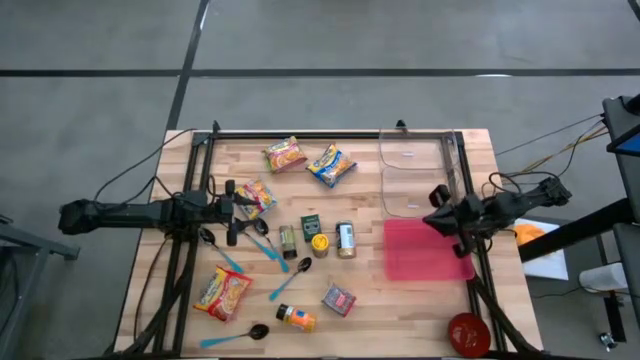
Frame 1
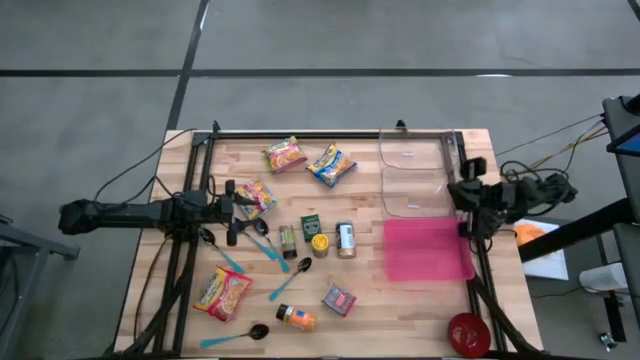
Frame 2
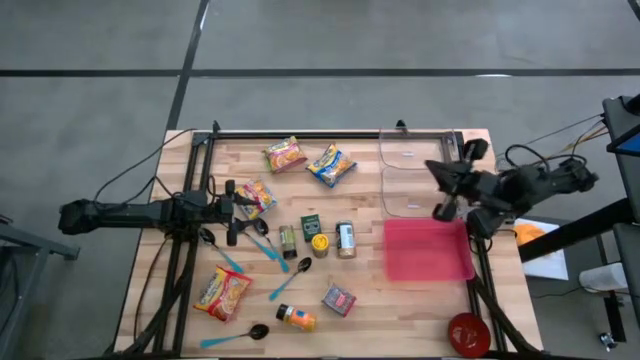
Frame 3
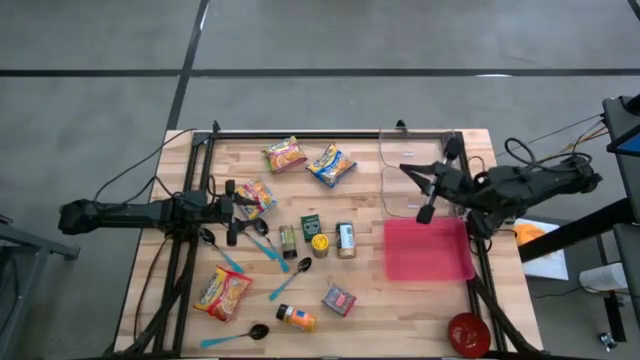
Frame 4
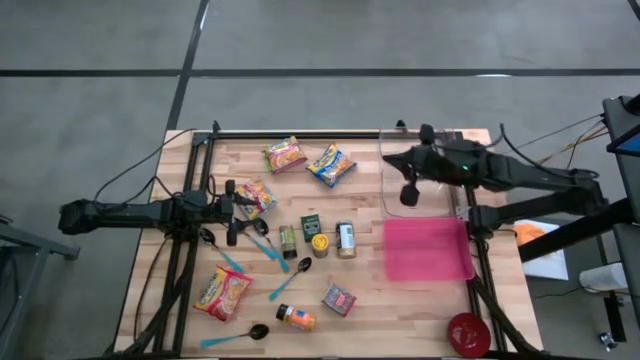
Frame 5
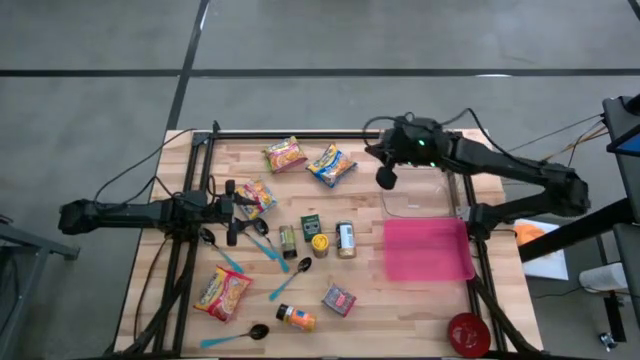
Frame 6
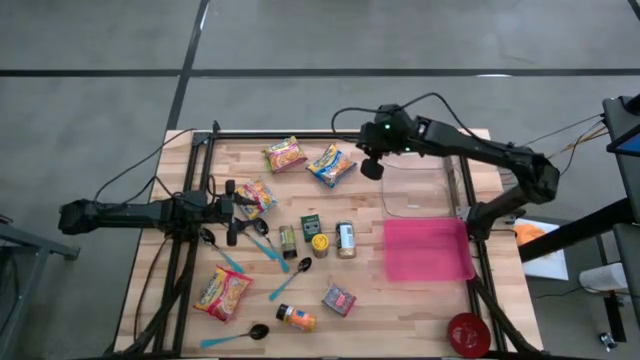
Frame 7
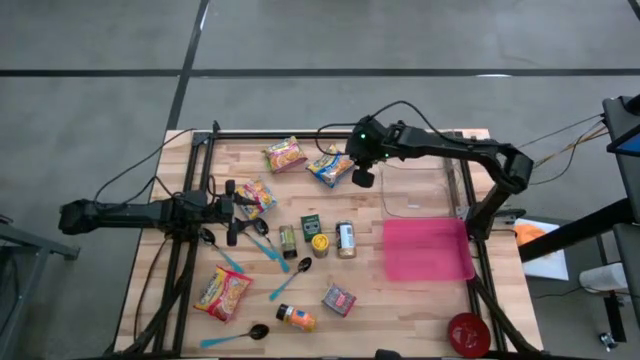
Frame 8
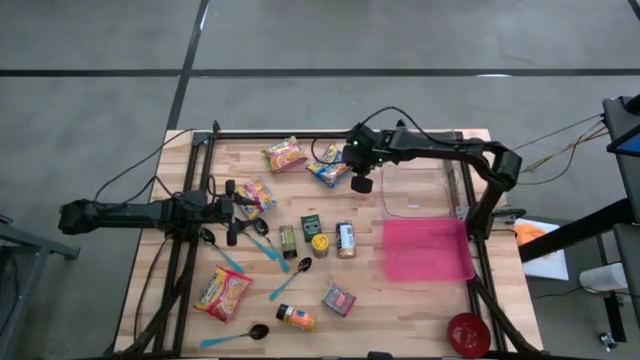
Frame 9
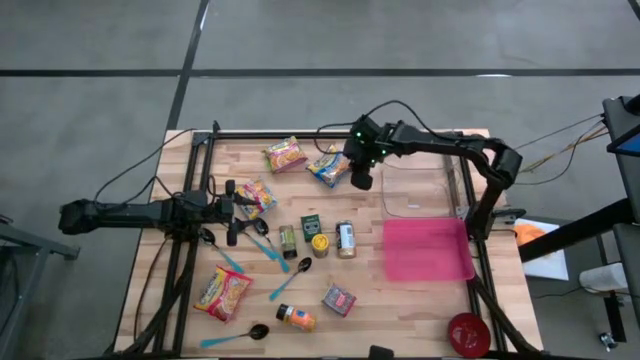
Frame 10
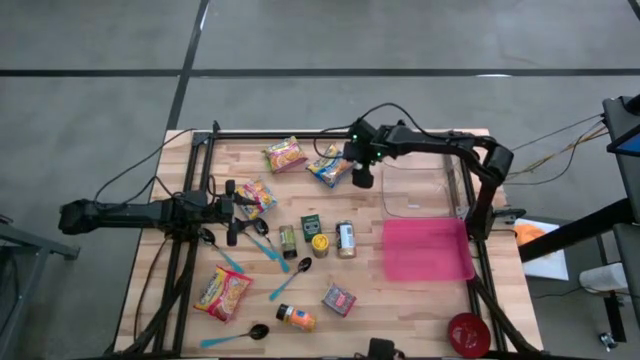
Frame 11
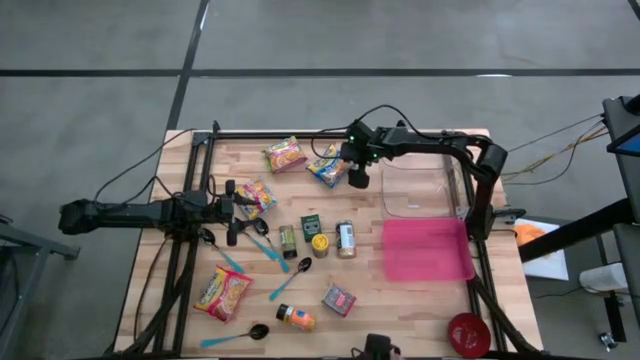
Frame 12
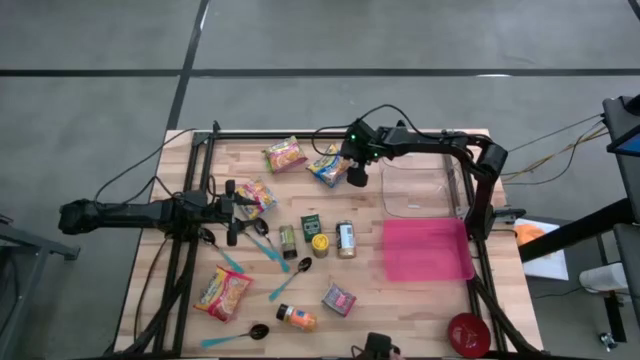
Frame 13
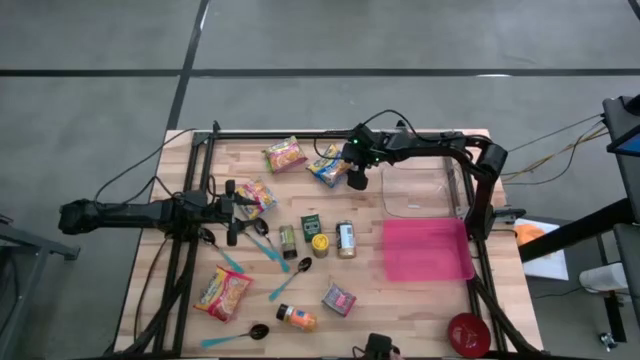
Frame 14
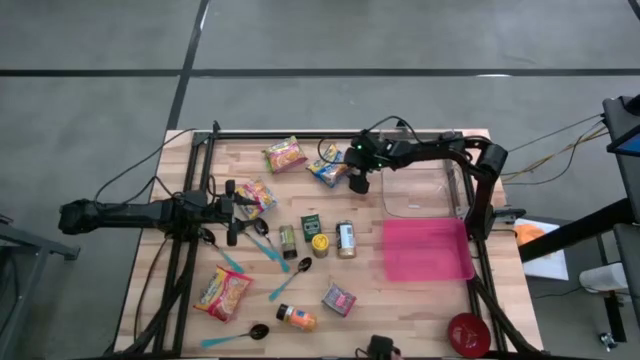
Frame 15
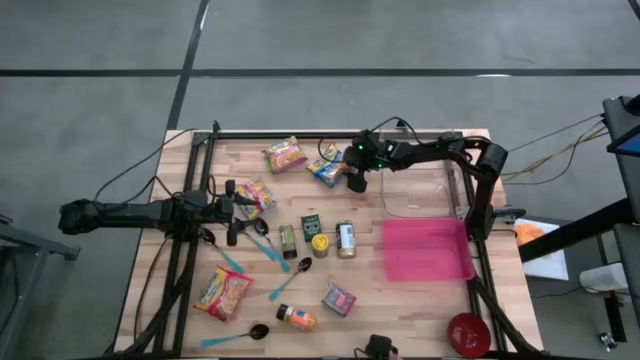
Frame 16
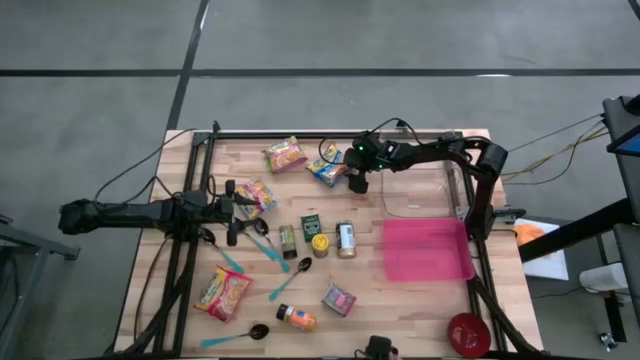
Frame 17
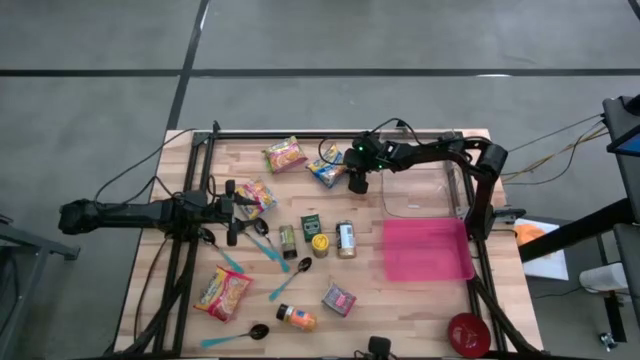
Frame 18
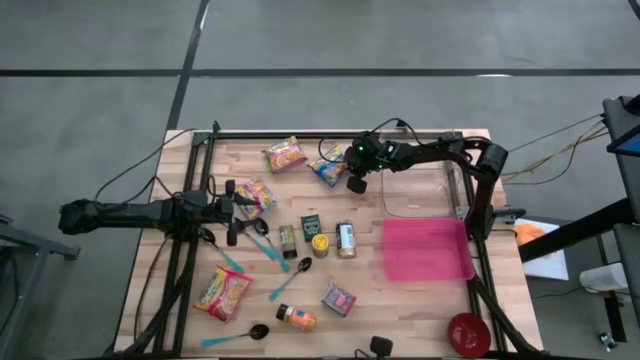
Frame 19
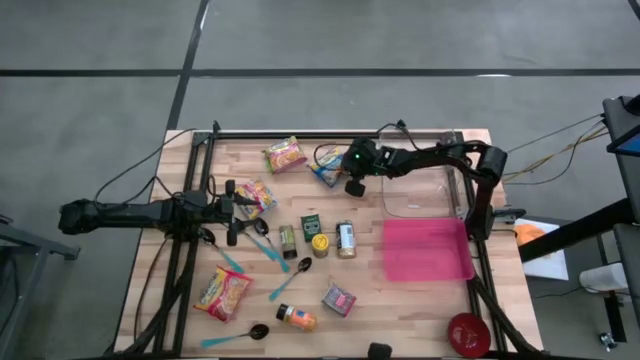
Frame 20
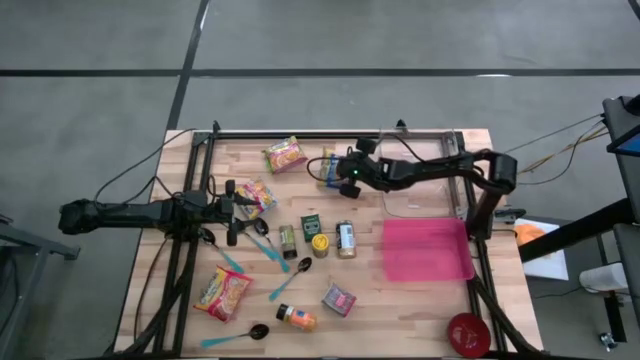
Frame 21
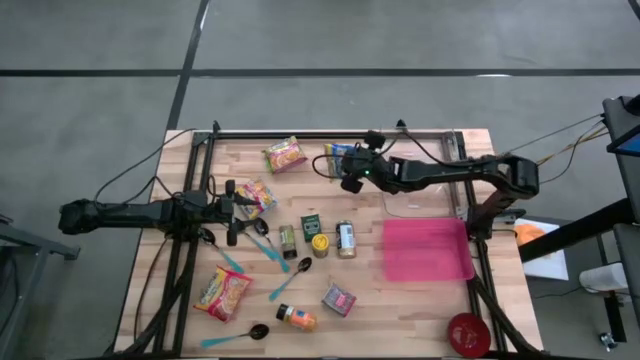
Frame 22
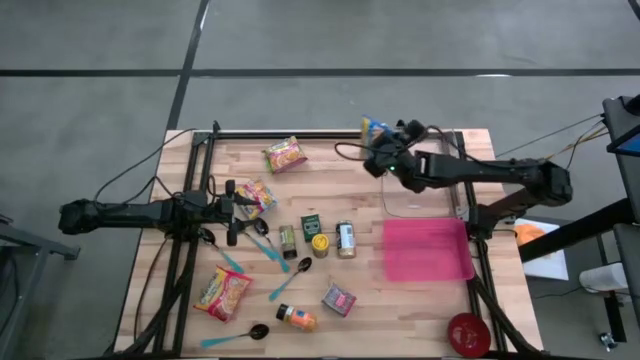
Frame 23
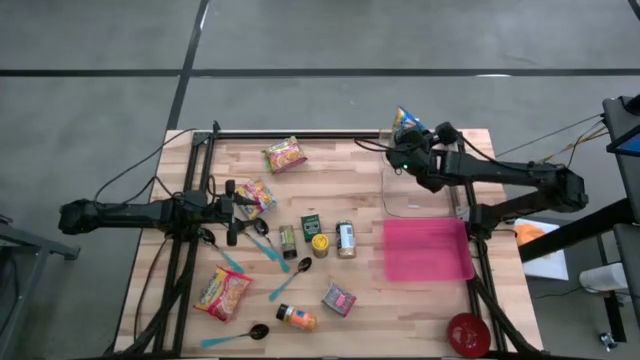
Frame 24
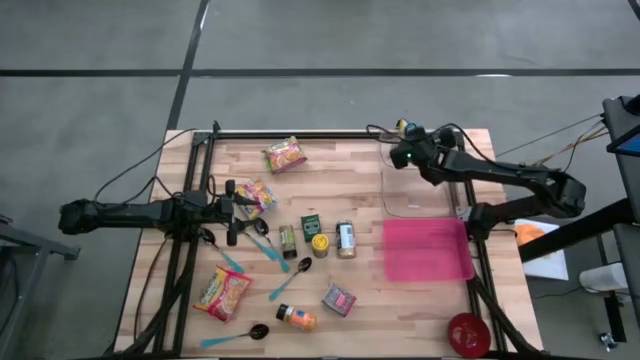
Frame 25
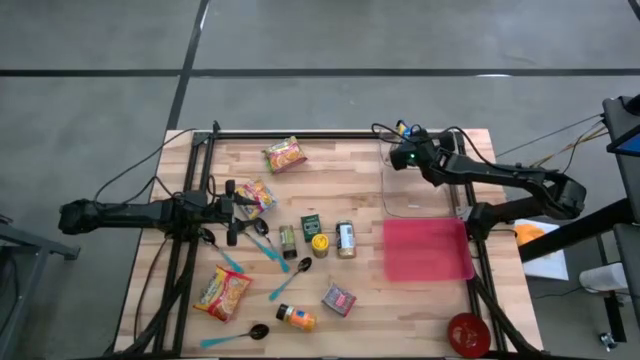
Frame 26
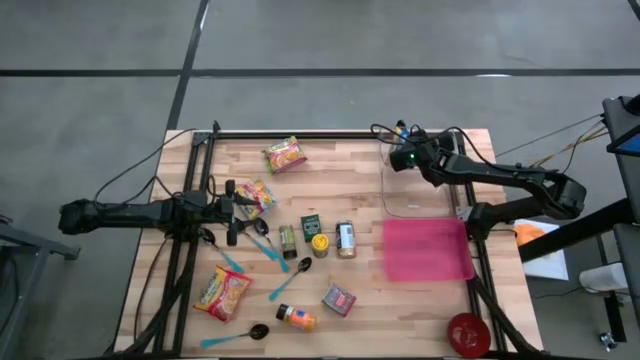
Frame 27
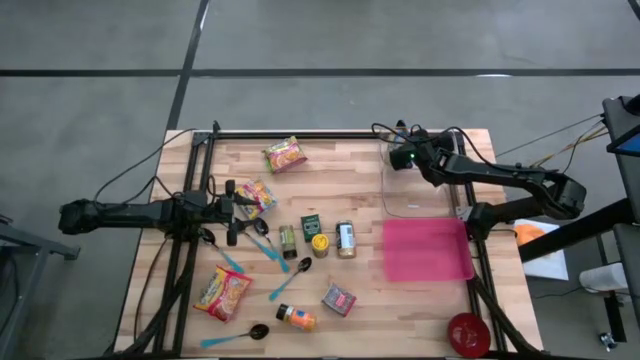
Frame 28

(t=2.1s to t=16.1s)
Put the blue noodle pack into the top transparent bin
